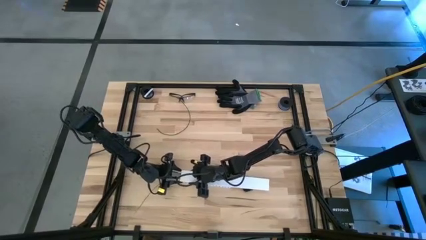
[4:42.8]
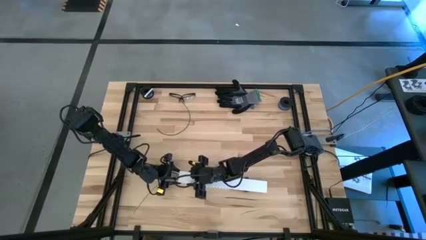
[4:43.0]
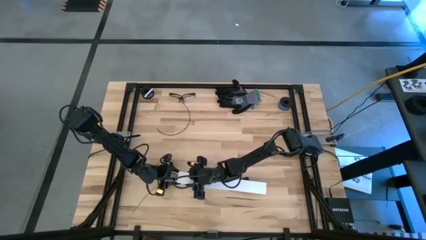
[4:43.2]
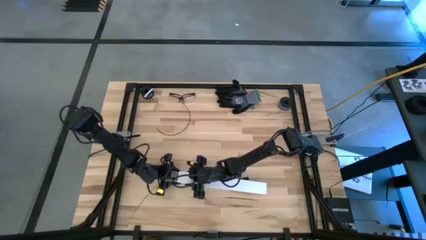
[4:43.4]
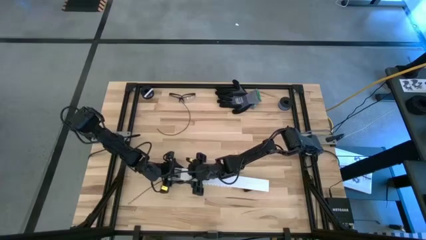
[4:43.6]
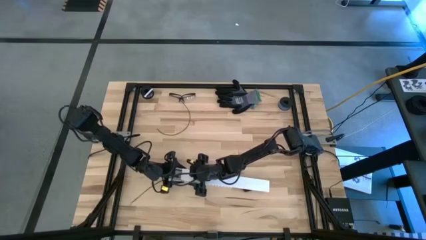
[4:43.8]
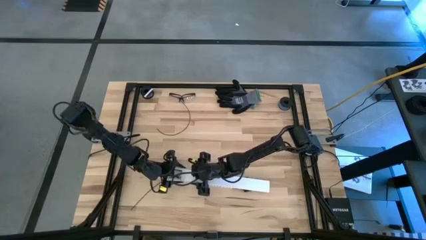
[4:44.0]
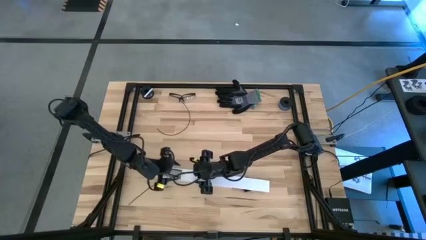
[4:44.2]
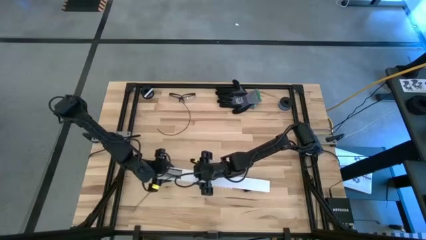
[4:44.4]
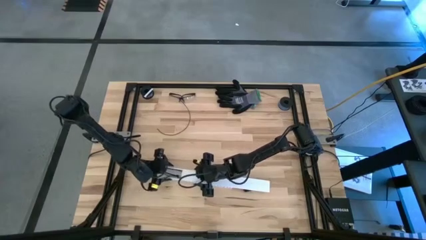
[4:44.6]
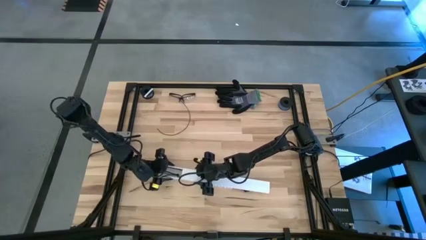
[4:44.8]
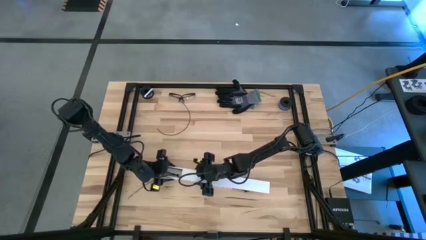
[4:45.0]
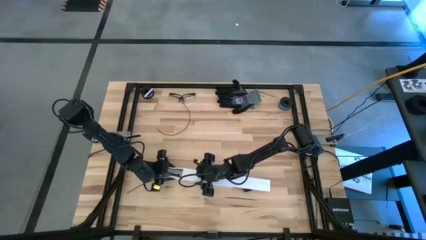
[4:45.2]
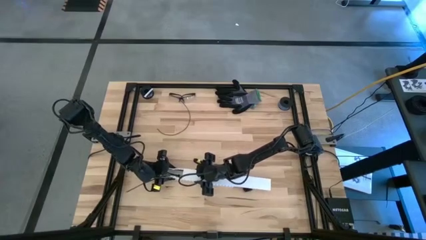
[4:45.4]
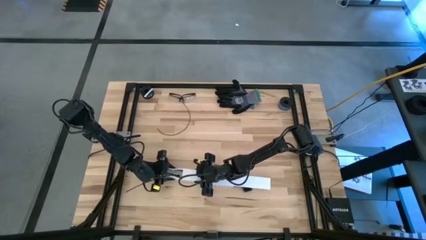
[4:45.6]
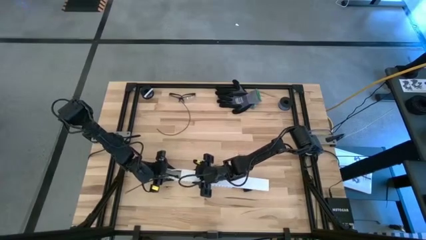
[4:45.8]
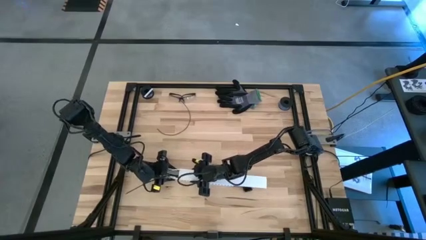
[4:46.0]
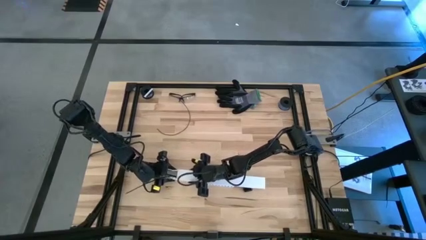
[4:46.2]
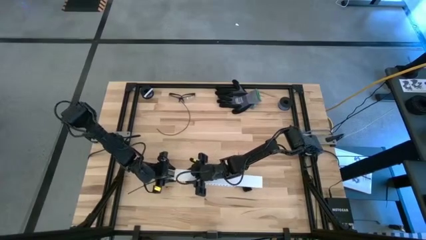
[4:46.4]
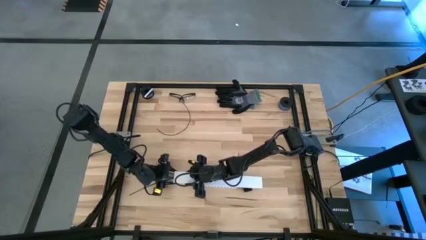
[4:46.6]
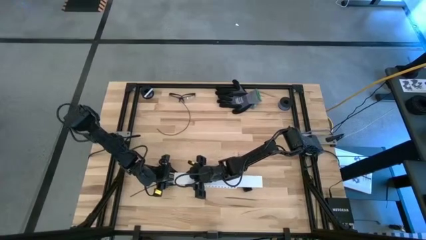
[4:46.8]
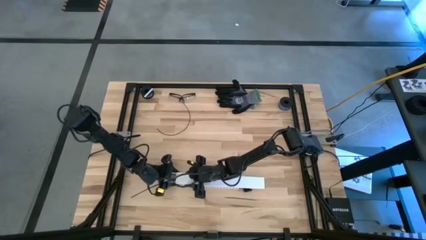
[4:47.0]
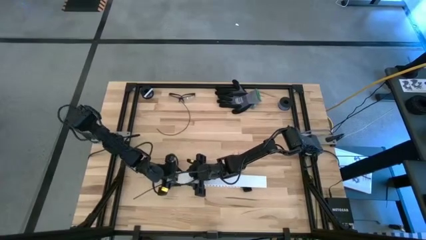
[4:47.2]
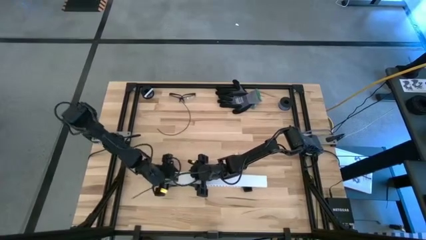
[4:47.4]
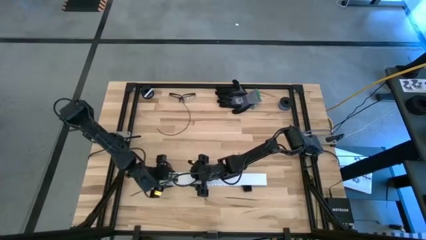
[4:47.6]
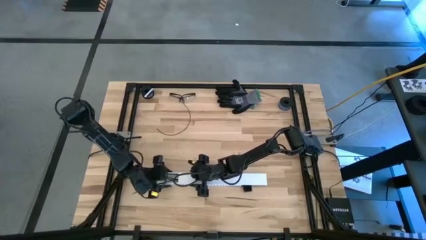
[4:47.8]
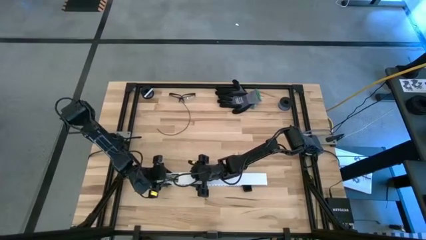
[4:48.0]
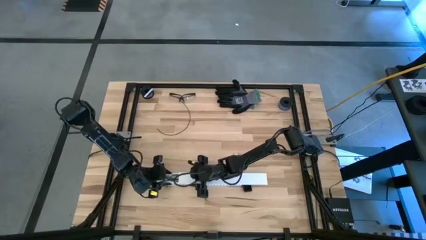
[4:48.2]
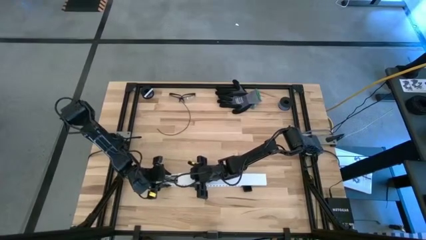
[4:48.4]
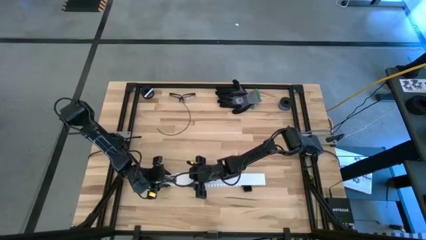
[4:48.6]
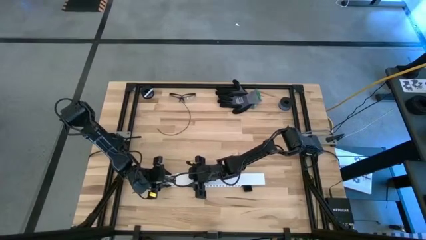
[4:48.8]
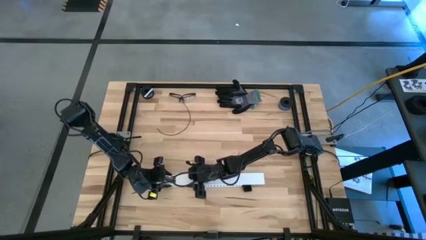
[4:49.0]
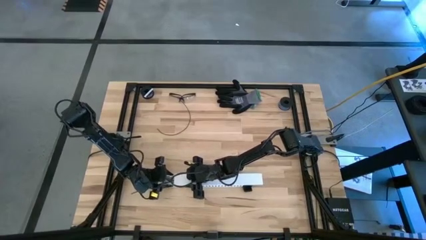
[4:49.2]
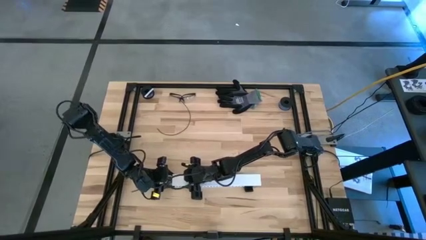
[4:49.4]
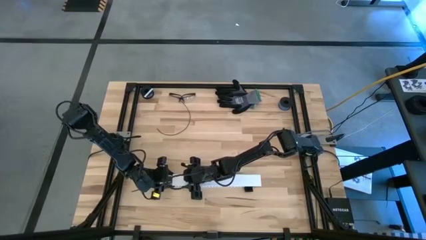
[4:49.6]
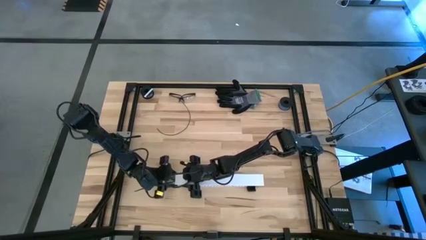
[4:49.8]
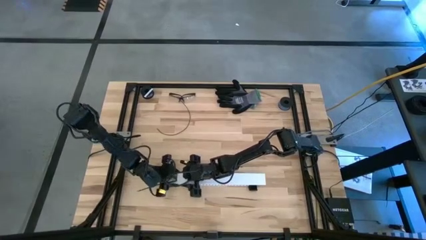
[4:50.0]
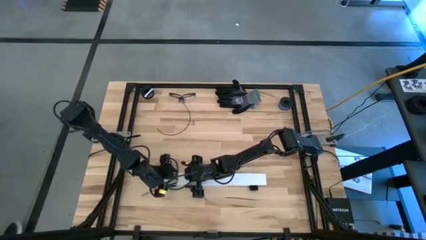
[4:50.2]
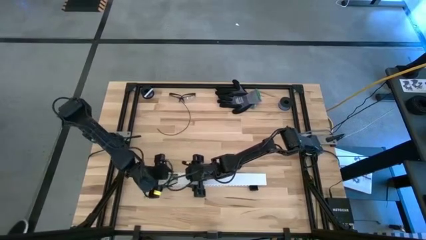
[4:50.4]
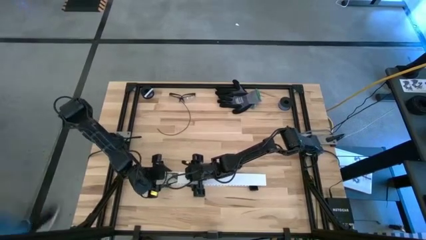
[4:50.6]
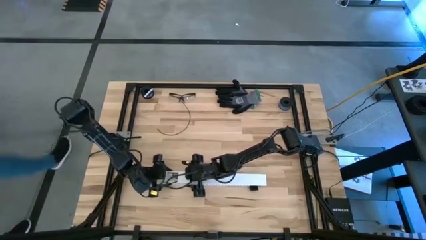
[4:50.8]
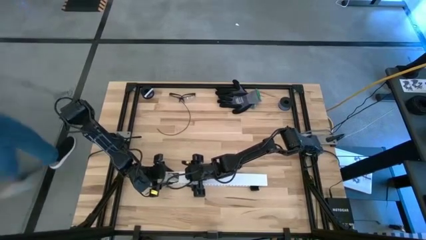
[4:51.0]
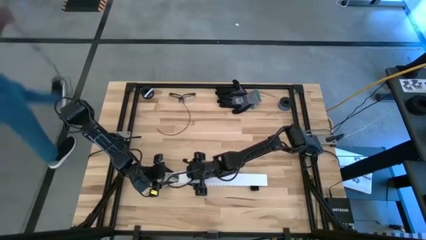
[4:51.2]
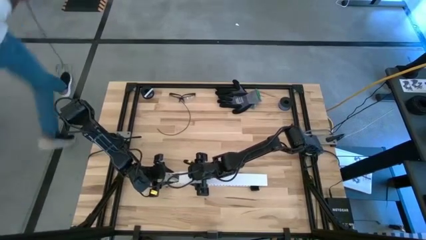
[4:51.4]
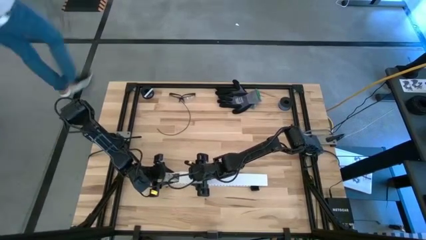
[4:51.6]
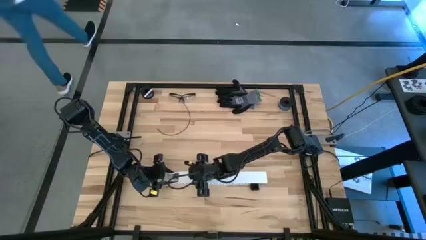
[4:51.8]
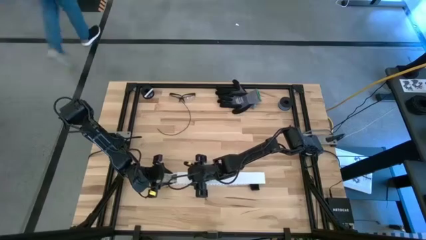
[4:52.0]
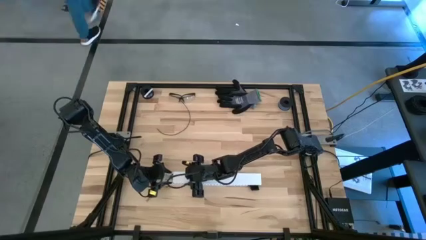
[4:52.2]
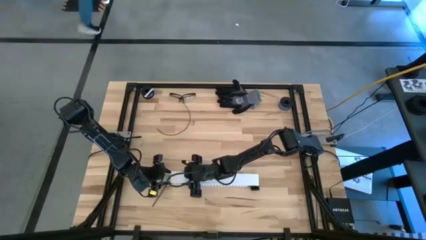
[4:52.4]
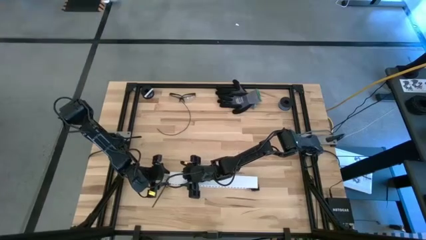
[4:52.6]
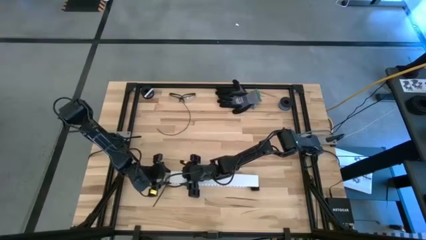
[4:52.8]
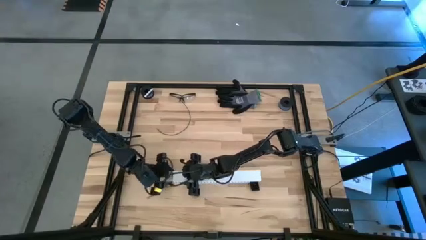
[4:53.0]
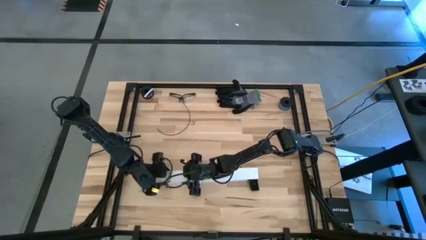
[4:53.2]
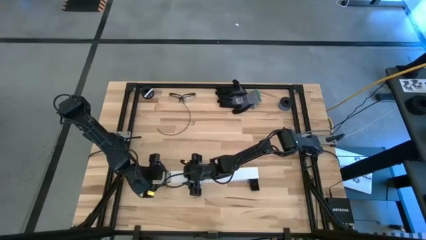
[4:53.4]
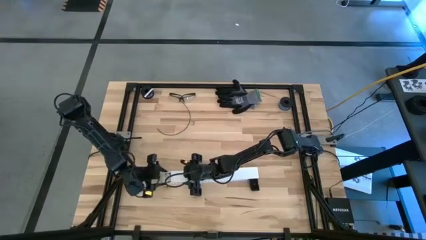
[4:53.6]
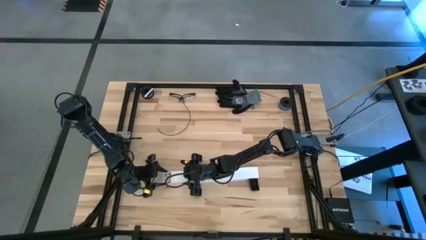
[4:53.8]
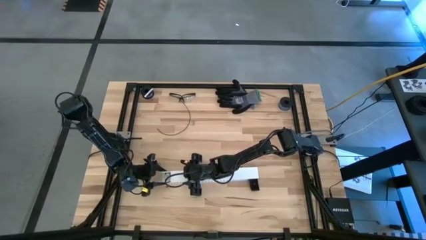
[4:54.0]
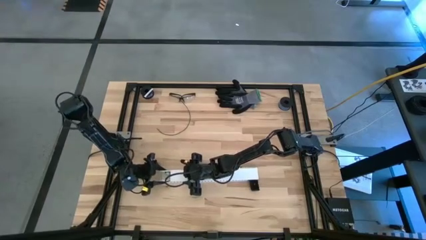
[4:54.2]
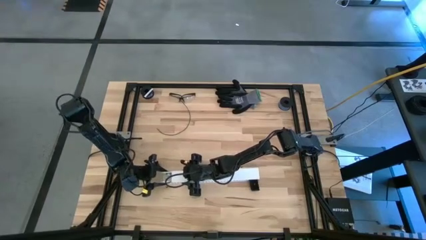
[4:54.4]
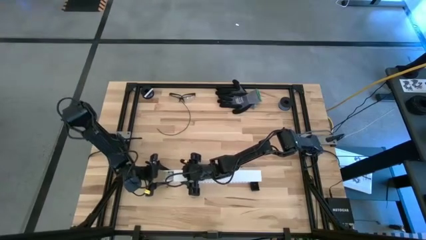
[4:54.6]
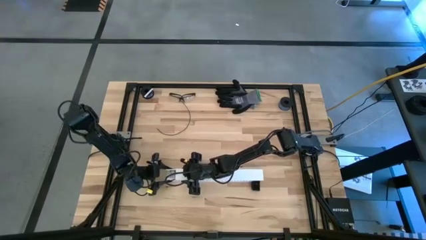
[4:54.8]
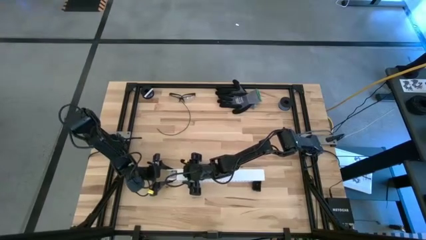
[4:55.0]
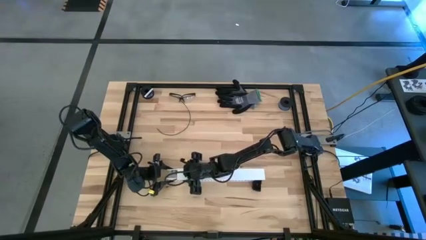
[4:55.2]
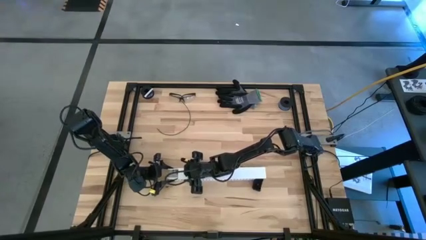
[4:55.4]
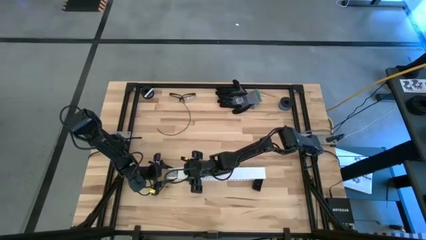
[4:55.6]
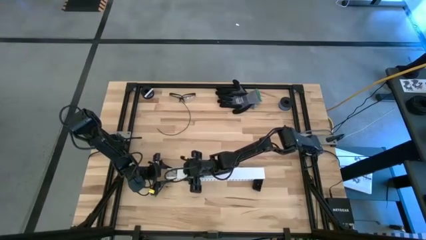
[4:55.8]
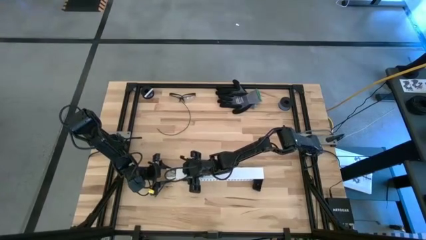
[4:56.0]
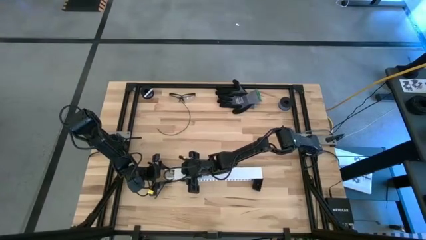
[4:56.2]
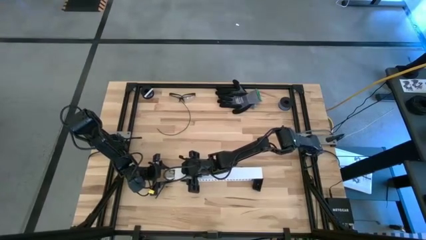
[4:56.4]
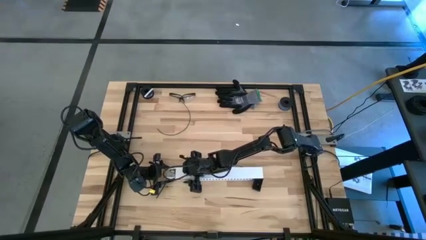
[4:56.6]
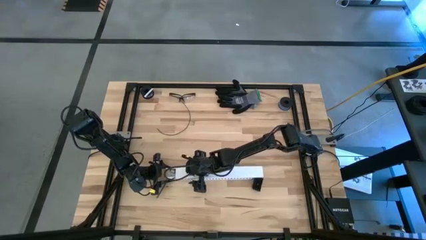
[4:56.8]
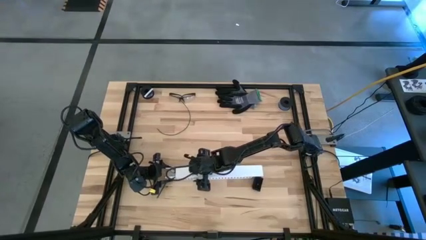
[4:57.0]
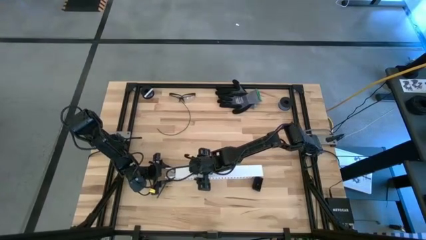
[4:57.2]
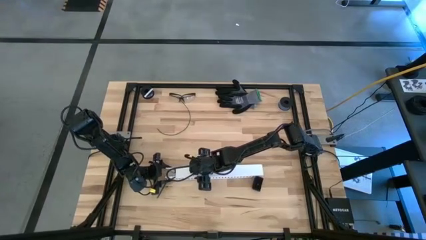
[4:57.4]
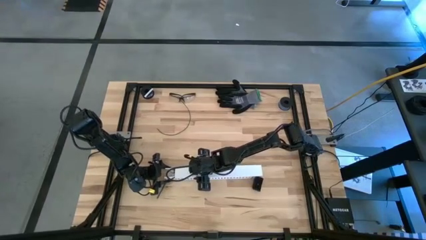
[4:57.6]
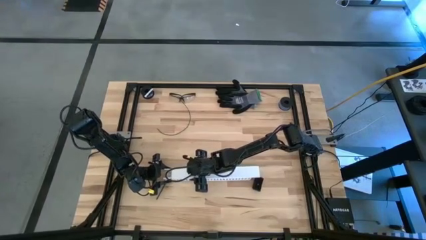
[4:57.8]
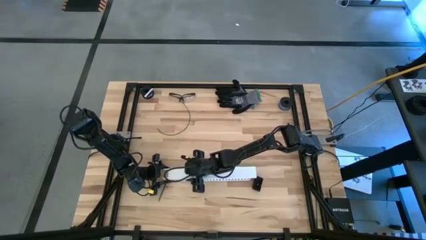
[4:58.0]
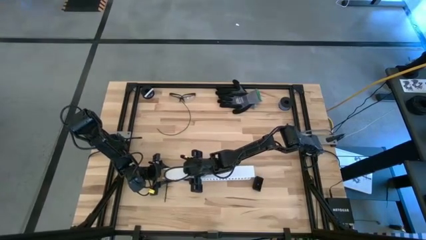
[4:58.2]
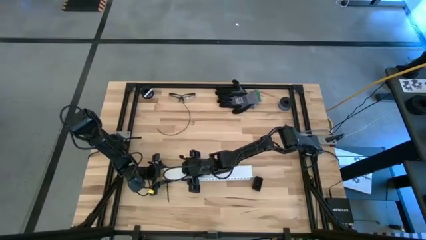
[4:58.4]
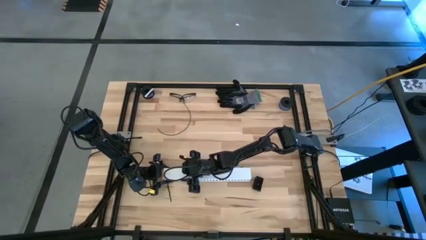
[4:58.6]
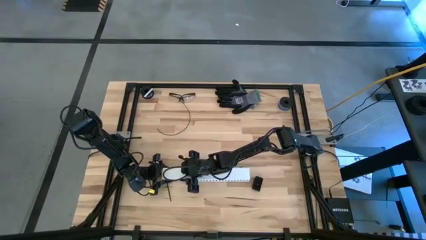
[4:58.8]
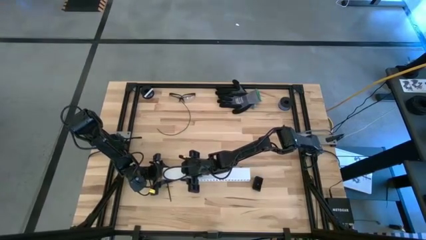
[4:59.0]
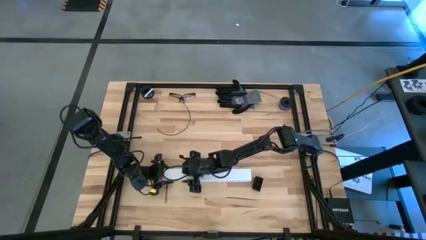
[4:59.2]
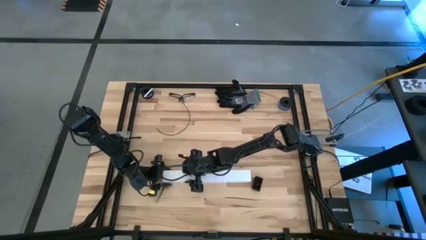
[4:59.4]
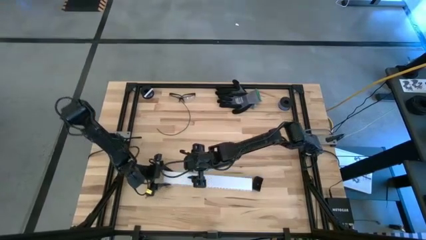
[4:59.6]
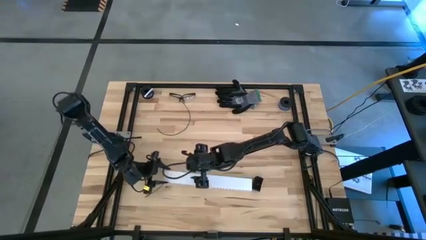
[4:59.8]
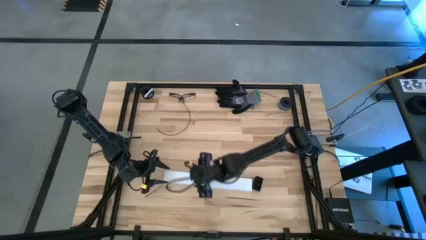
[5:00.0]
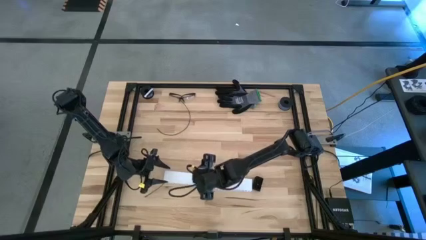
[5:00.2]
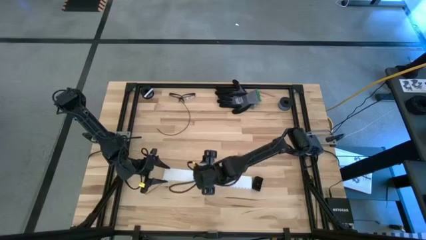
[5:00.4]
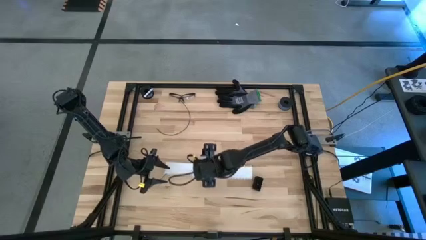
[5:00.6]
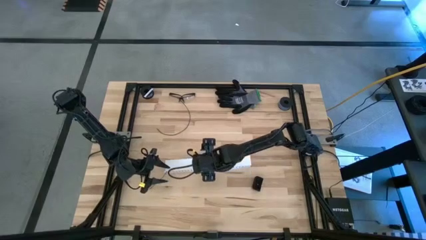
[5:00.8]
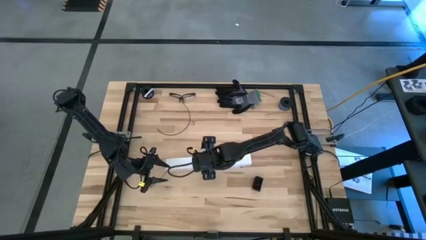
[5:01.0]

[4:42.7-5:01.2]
Task: Ziptie cables
Close the white cable duct lid
